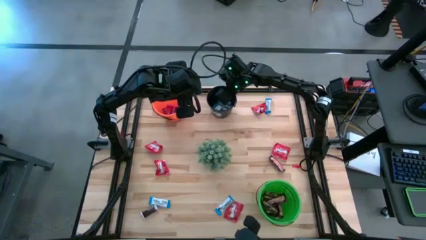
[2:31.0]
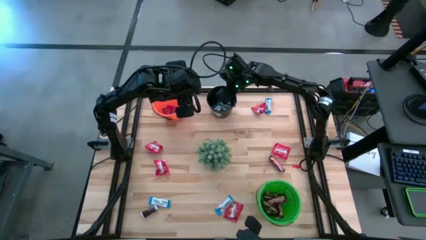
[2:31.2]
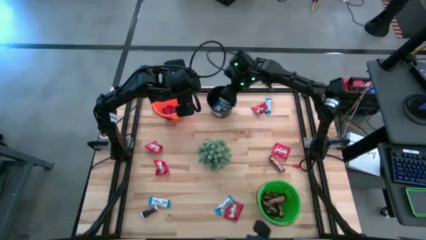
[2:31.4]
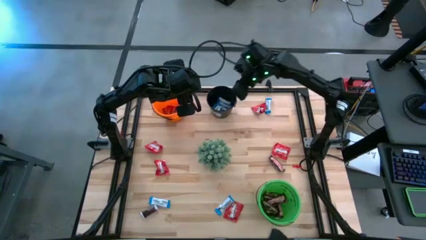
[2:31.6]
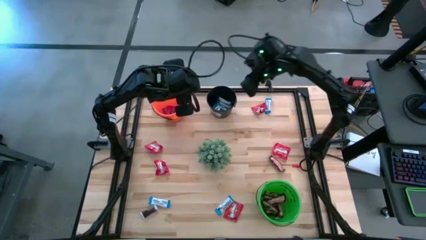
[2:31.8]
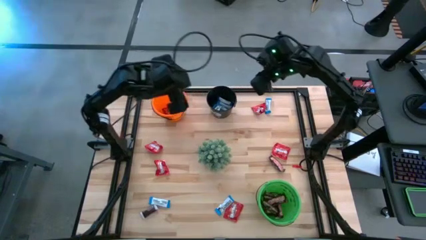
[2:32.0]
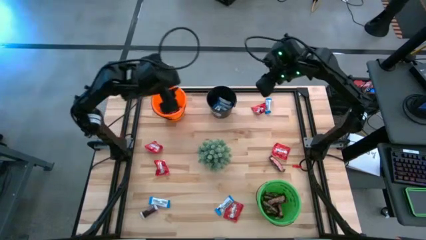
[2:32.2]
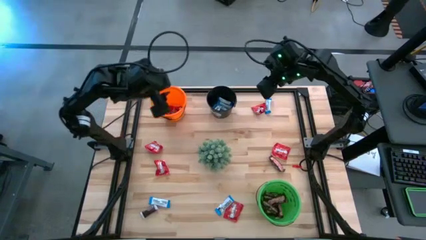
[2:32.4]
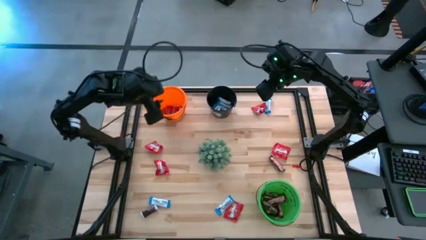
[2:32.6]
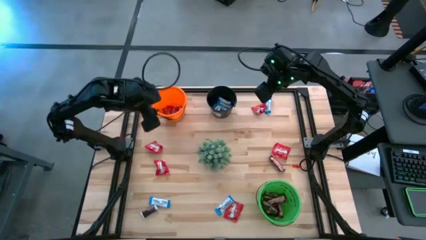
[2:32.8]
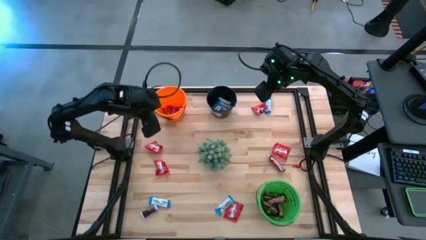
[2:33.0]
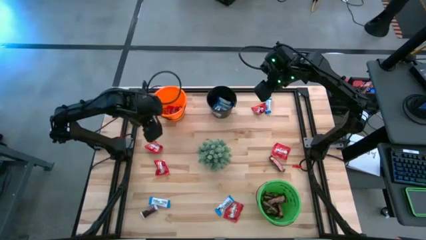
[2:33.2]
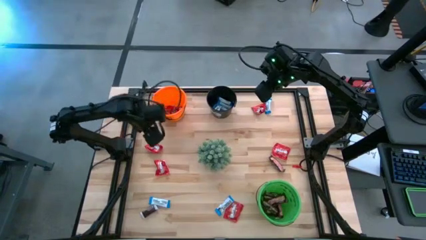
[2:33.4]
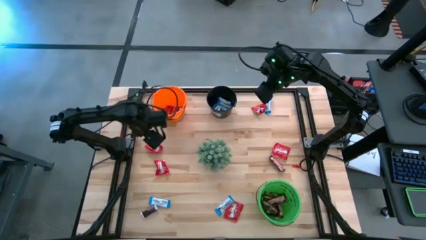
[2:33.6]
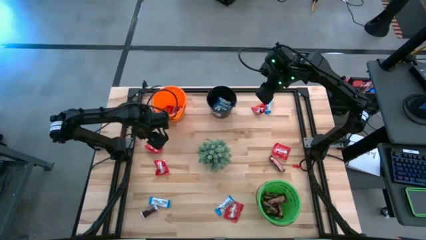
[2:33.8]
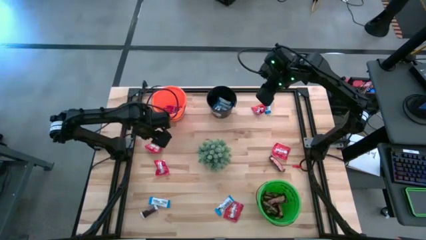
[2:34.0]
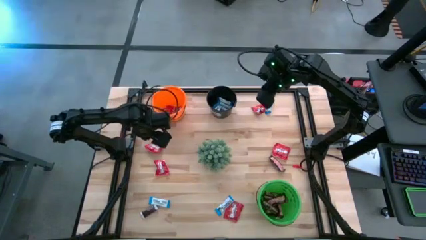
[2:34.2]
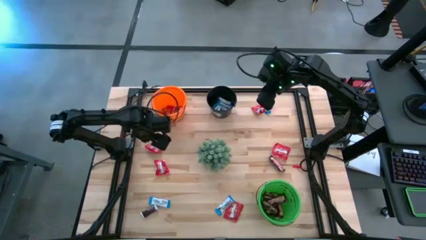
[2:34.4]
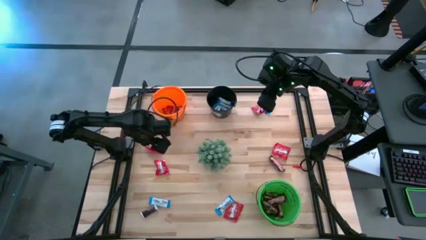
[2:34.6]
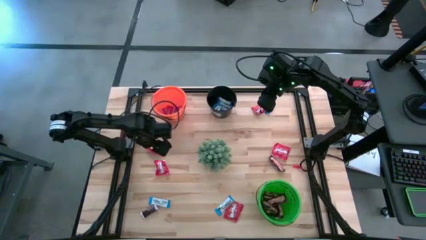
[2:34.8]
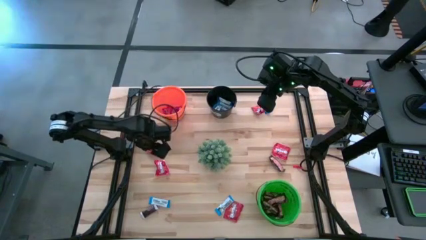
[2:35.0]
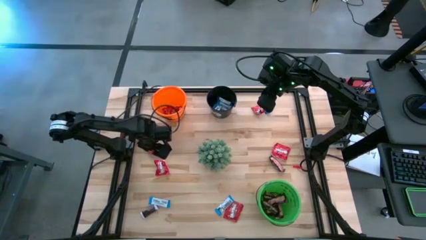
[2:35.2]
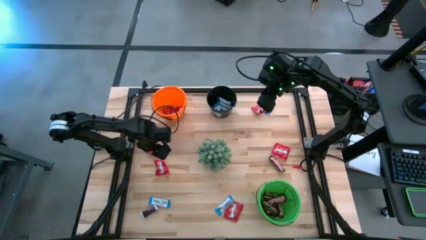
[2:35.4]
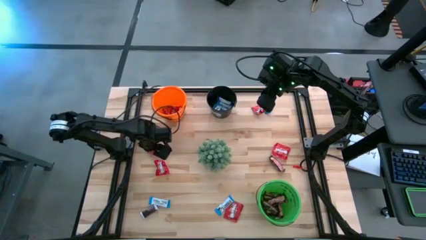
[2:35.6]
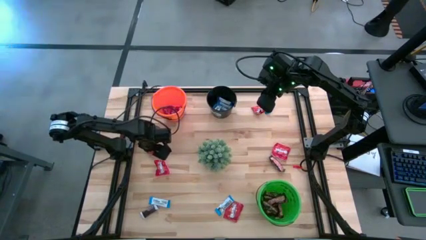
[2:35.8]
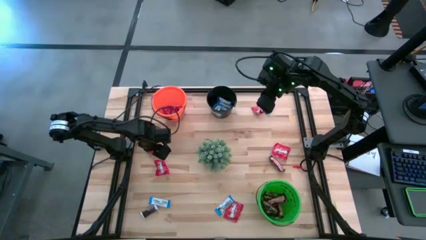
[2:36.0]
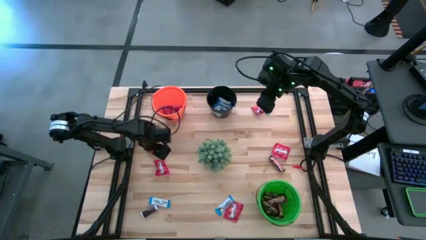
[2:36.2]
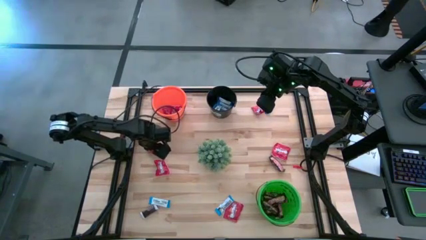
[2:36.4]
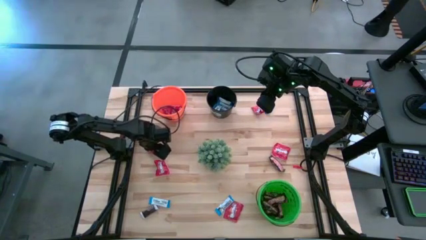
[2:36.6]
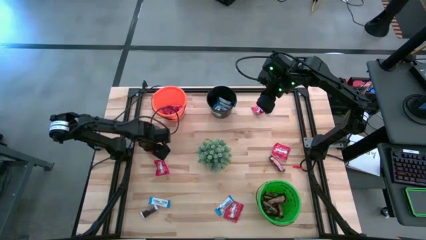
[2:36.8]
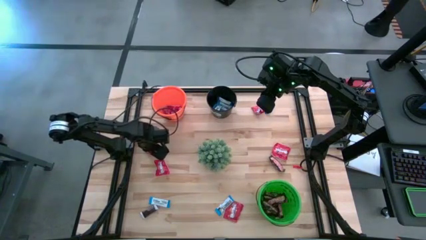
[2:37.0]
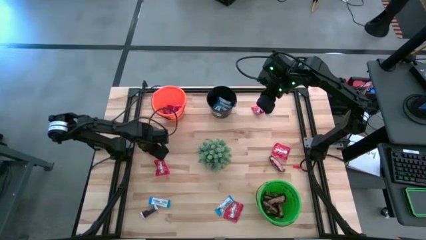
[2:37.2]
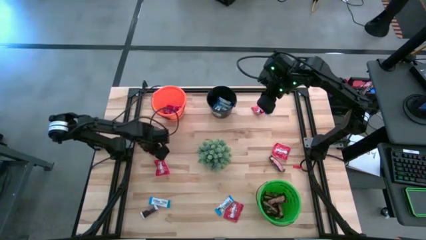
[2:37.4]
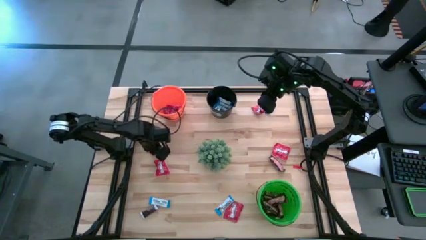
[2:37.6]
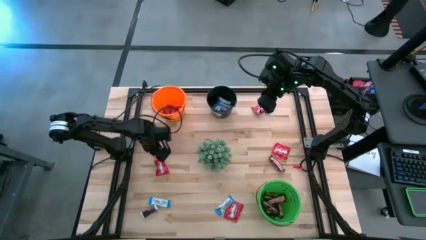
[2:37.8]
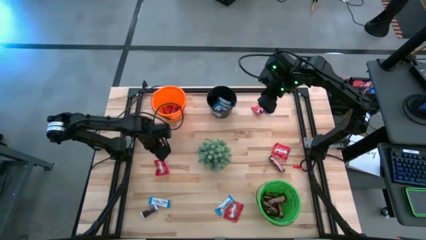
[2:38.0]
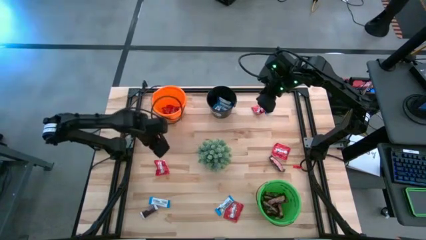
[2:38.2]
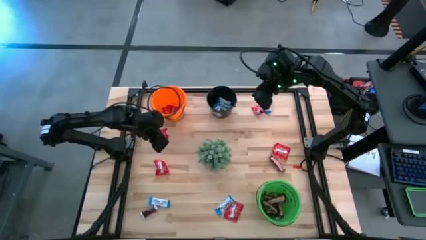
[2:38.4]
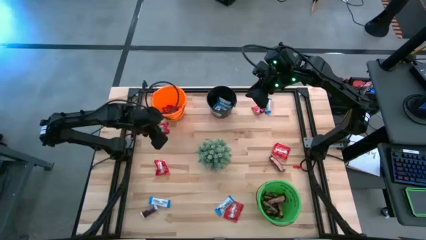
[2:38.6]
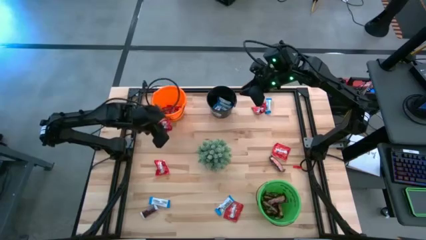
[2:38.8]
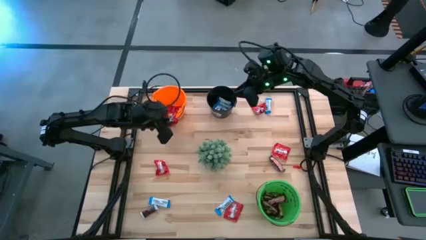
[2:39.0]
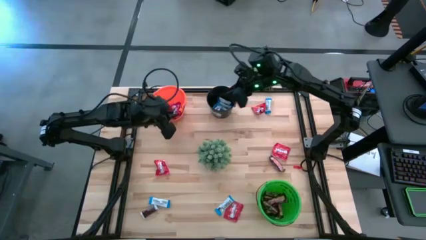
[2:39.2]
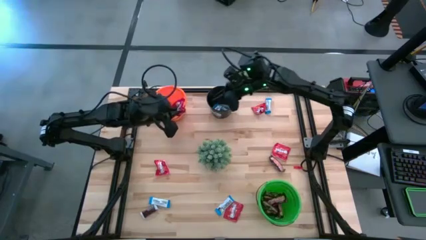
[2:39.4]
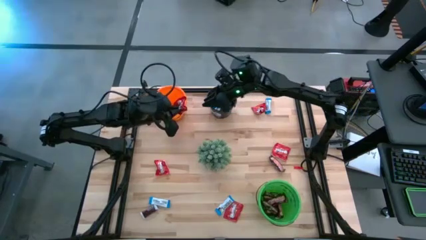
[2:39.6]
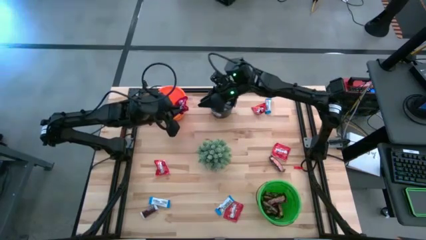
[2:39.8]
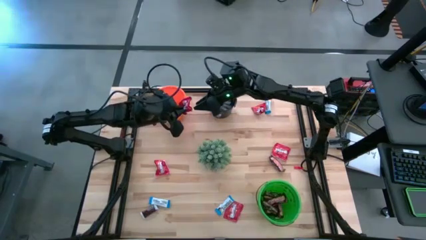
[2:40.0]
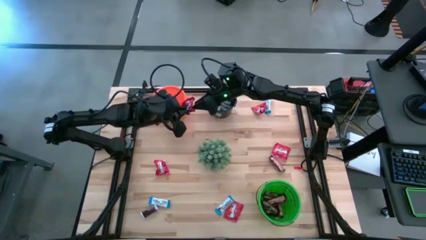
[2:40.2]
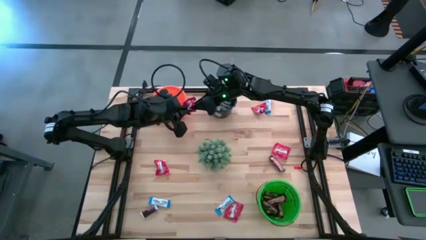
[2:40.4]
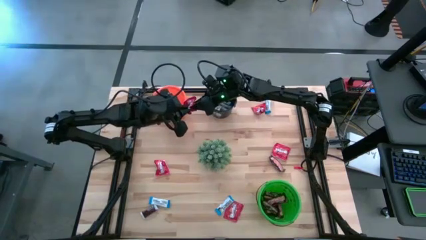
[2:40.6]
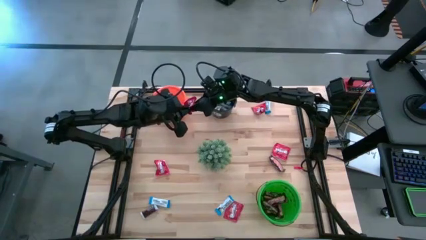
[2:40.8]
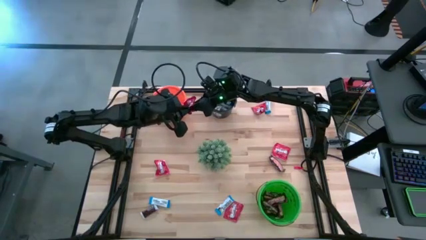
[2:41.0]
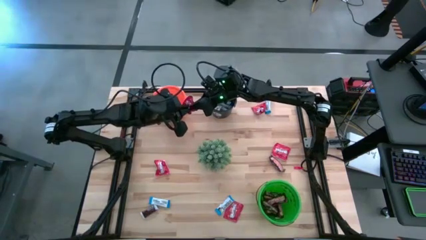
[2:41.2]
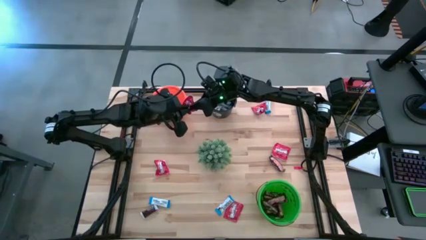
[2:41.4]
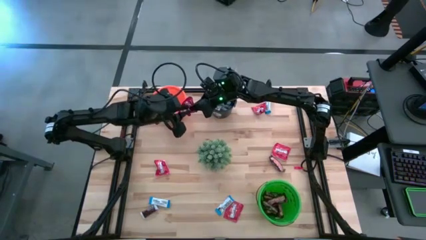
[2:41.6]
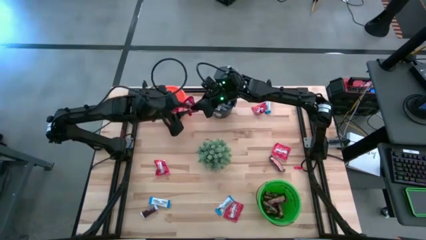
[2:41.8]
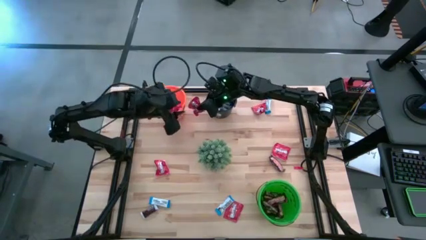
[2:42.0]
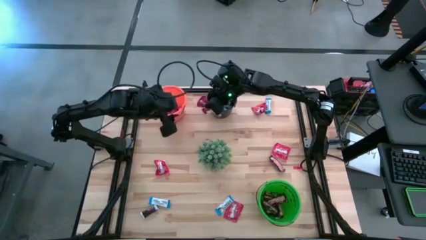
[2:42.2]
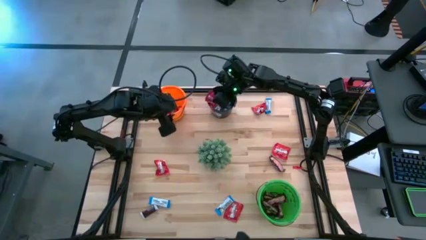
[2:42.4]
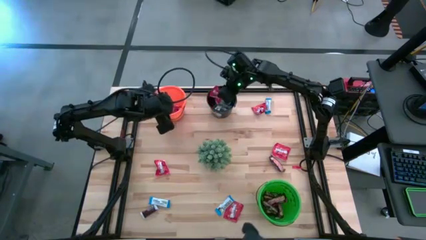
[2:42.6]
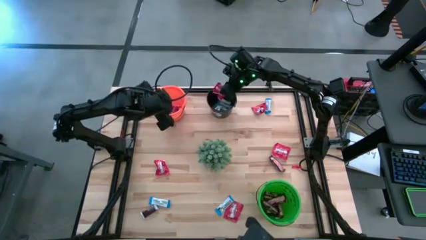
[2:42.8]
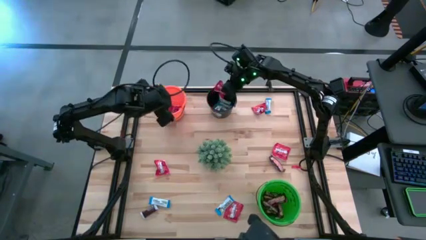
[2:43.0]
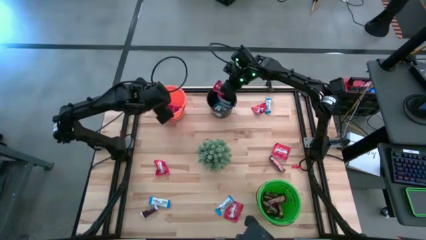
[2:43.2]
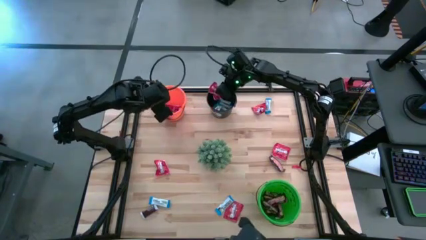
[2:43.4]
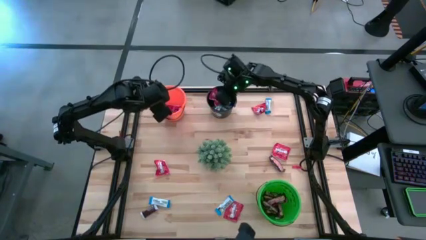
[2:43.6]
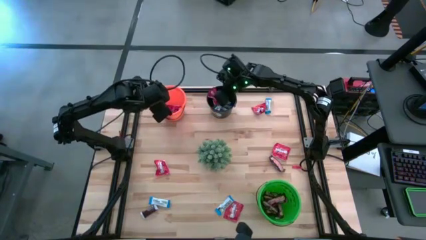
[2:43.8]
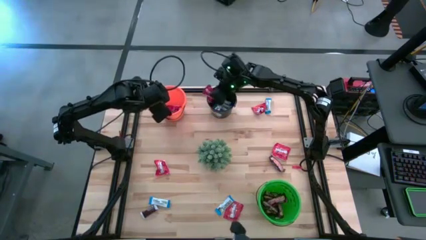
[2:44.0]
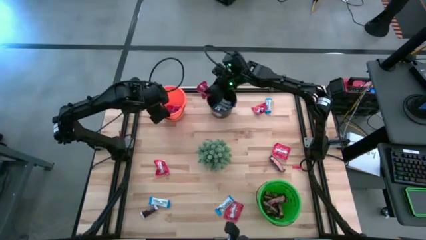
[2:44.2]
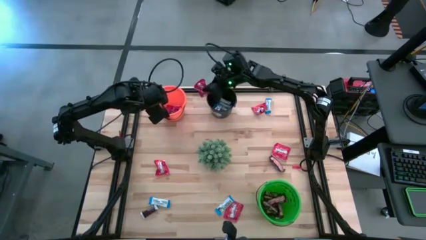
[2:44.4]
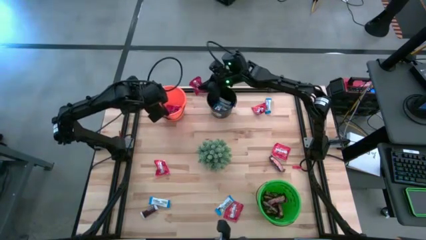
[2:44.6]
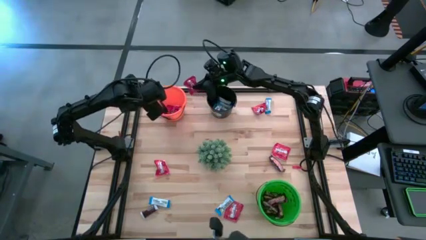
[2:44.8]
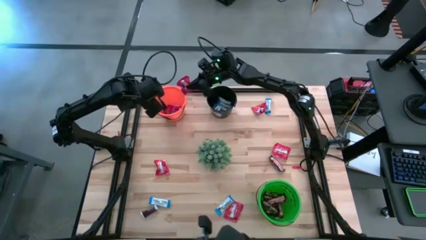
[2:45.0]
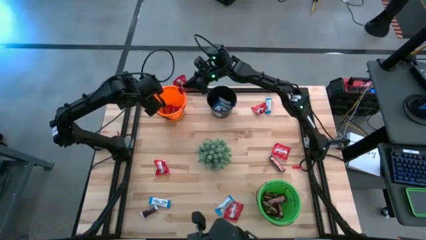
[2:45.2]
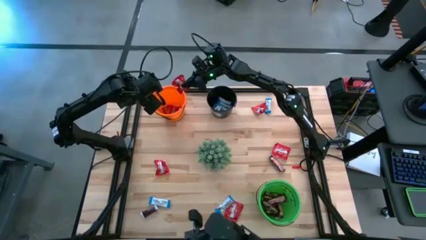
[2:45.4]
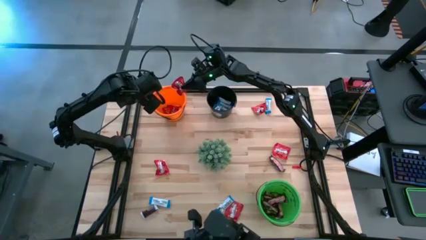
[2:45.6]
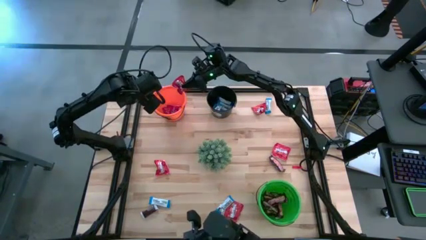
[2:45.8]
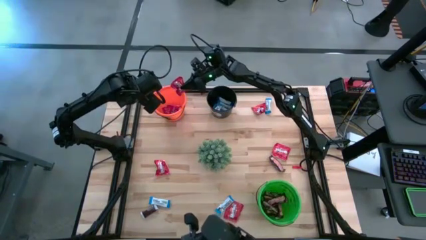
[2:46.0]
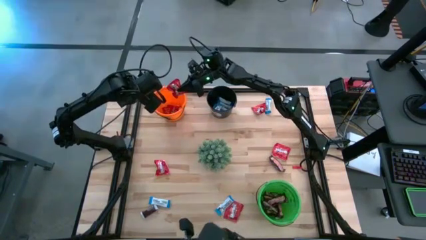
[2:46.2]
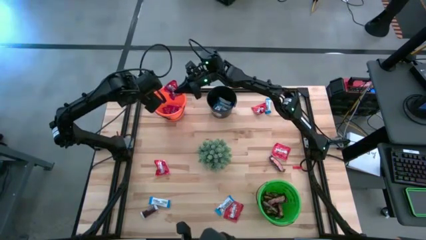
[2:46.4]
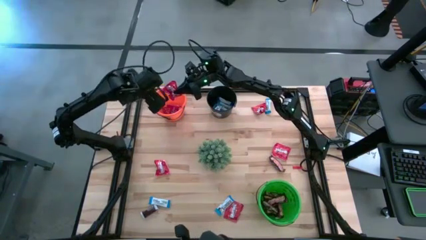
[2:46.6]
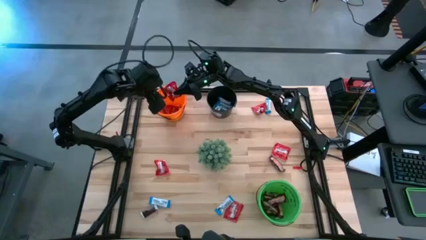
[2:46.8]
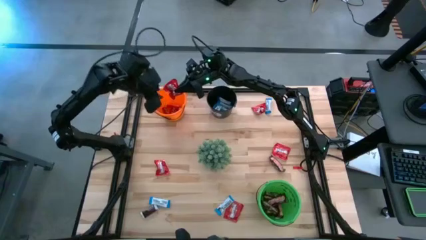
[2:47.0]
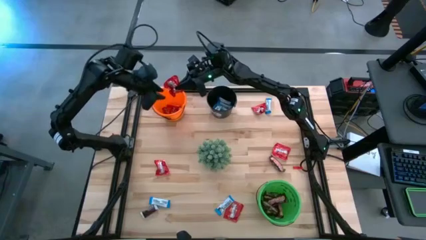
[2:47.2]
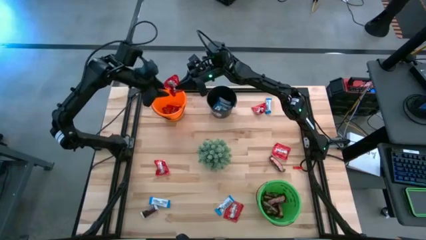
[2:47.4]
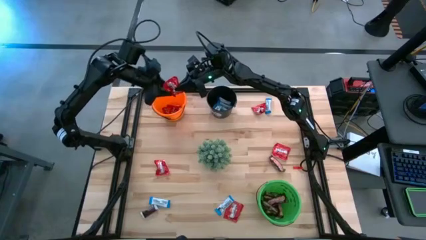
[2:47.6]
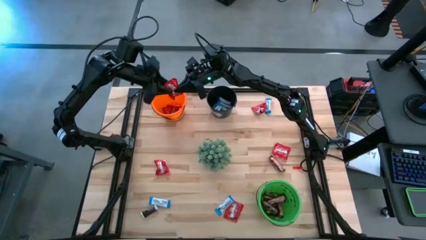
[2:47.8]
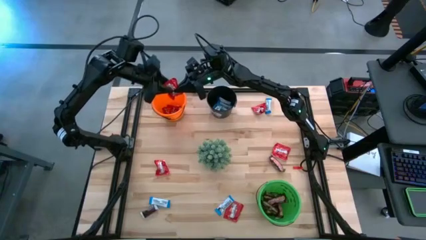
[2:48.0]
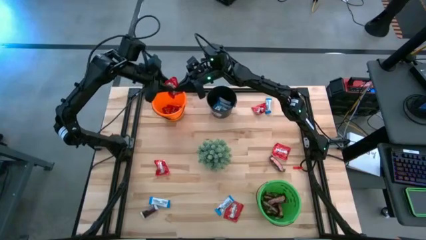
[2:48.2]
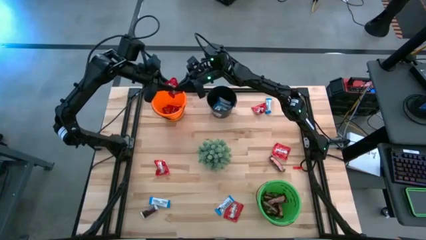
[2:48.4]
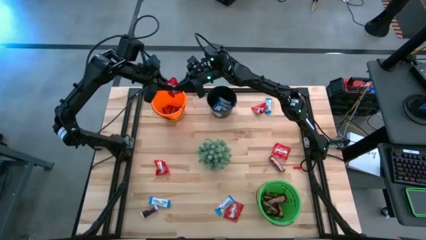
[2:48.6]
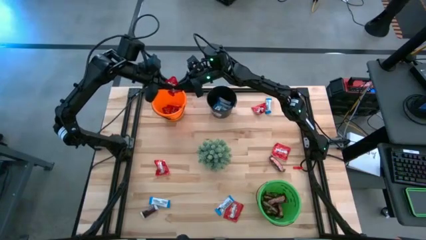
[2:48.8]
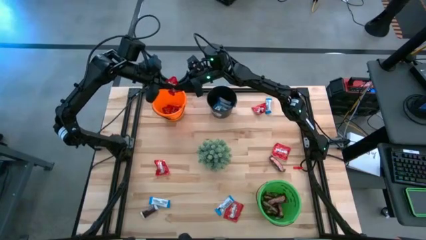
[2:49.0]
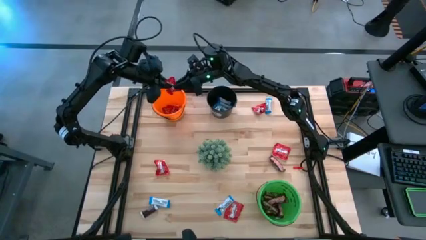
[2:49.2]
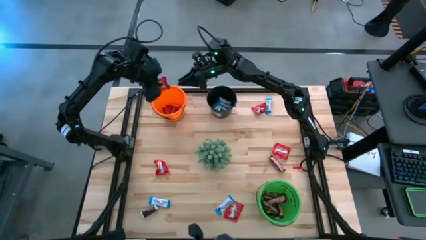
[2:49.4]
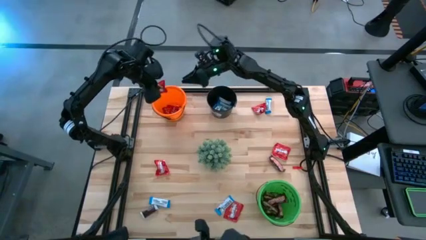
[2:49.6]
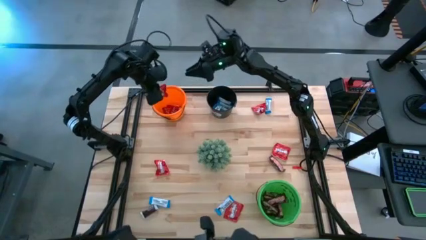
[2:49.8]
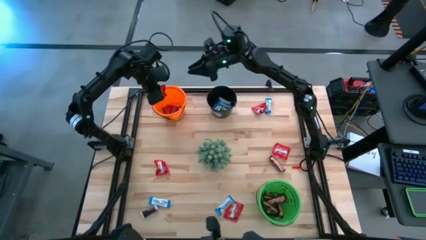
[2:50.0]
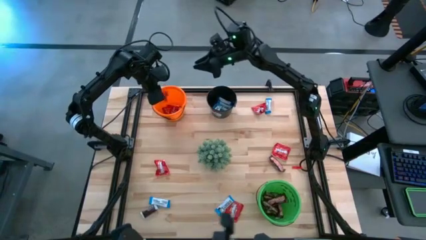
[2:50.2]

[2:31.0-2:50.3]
Task: Organize candy in baskets
Put the red candy into the orange bucket
